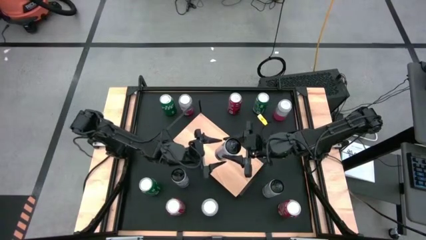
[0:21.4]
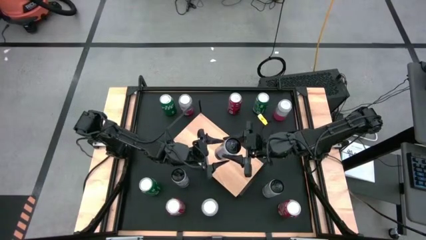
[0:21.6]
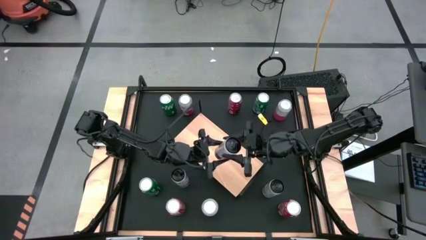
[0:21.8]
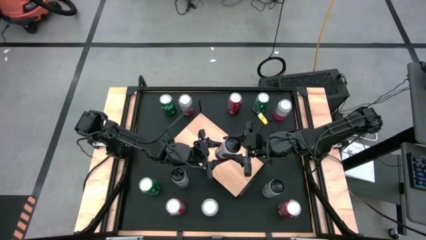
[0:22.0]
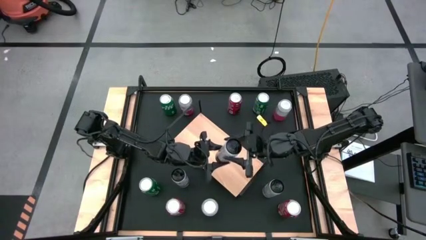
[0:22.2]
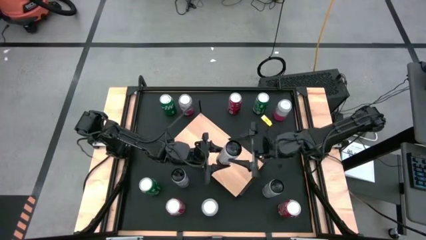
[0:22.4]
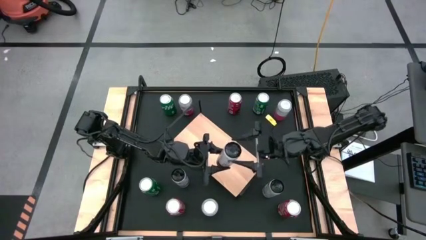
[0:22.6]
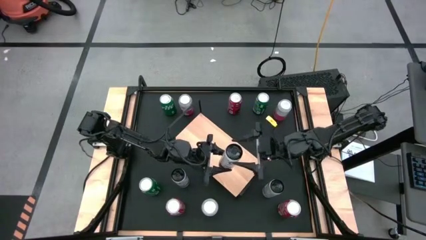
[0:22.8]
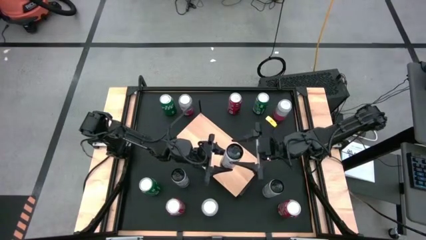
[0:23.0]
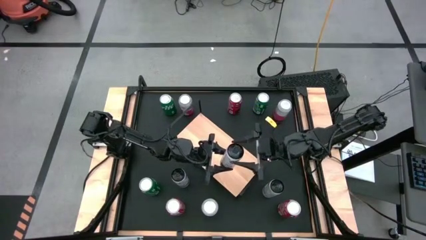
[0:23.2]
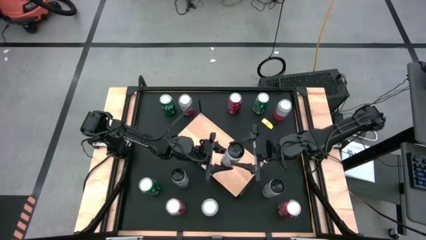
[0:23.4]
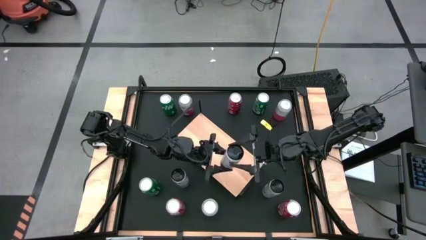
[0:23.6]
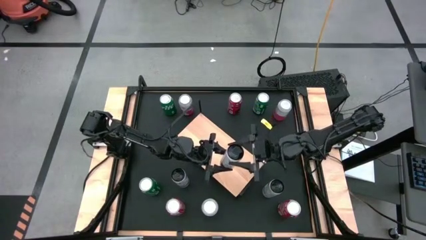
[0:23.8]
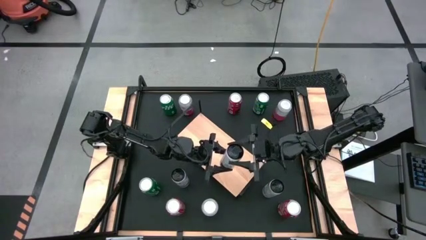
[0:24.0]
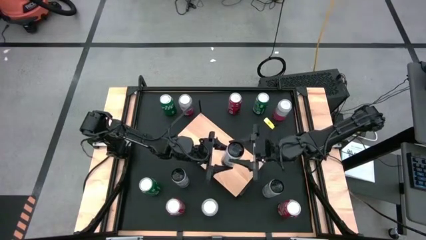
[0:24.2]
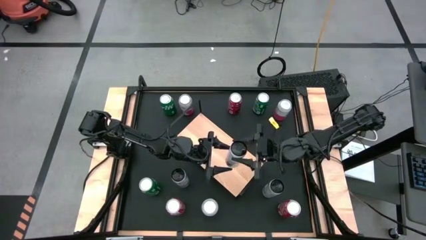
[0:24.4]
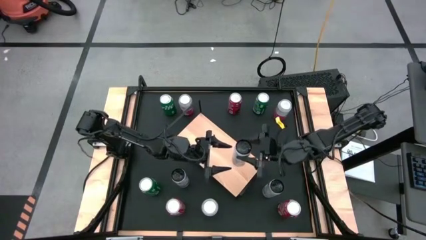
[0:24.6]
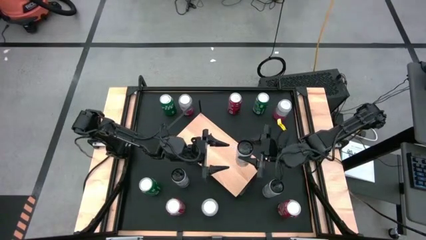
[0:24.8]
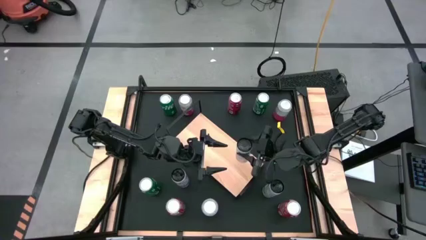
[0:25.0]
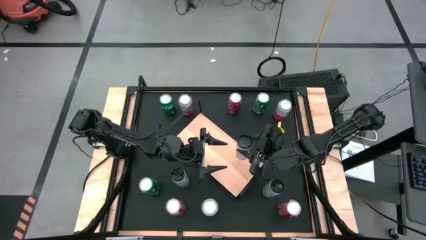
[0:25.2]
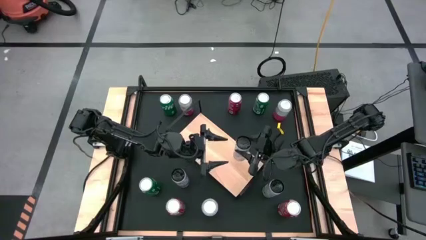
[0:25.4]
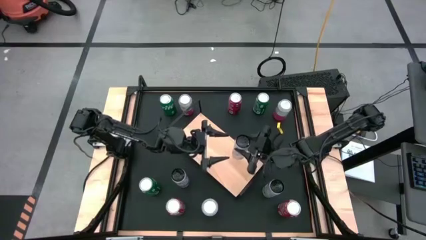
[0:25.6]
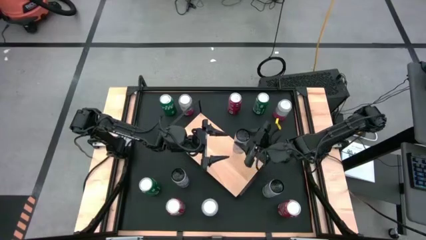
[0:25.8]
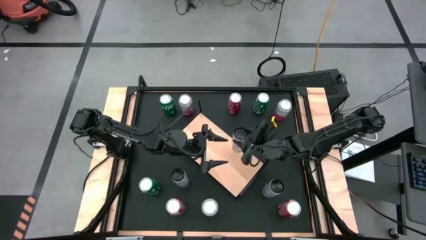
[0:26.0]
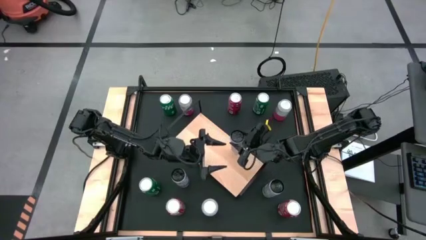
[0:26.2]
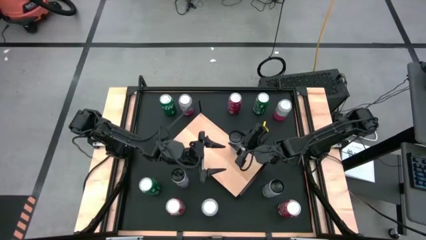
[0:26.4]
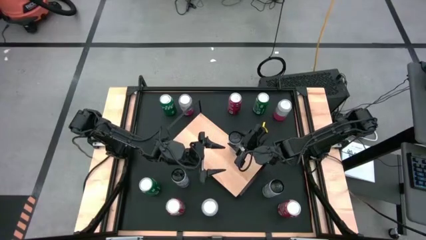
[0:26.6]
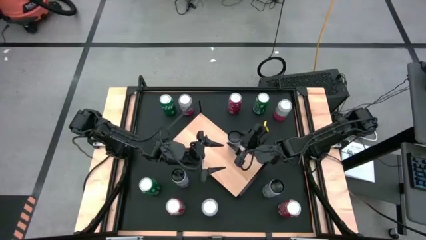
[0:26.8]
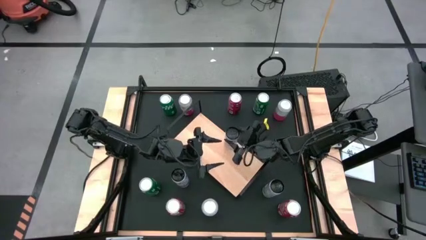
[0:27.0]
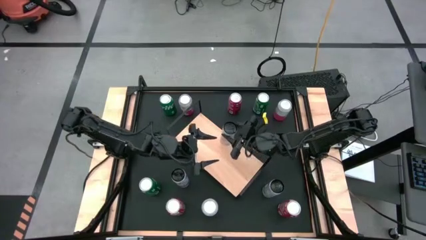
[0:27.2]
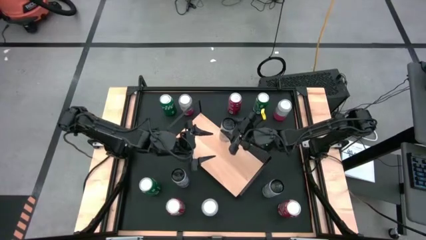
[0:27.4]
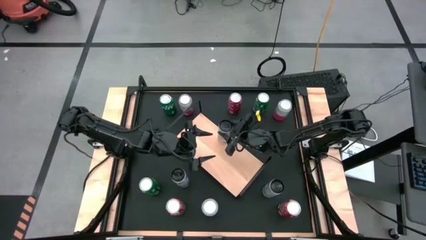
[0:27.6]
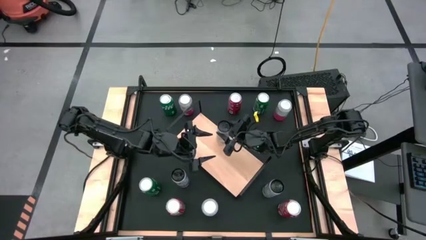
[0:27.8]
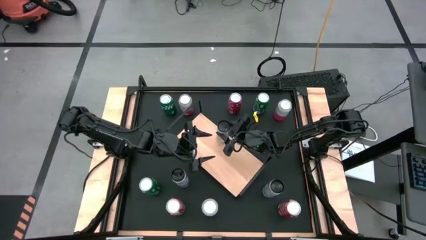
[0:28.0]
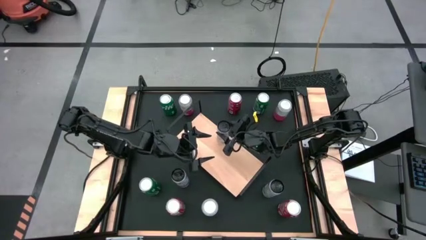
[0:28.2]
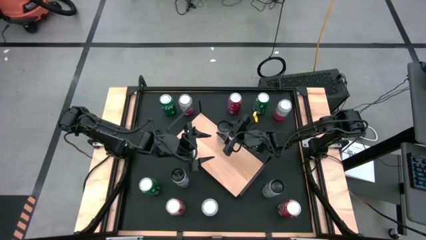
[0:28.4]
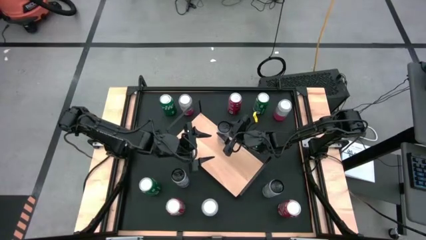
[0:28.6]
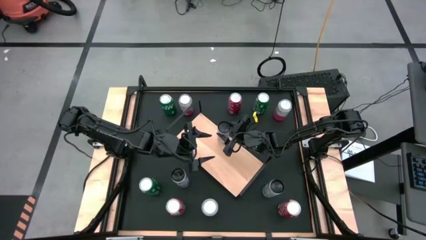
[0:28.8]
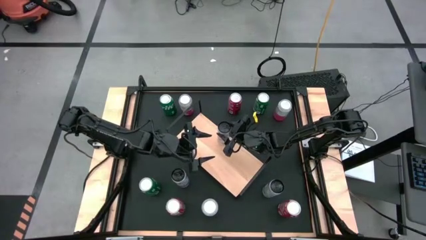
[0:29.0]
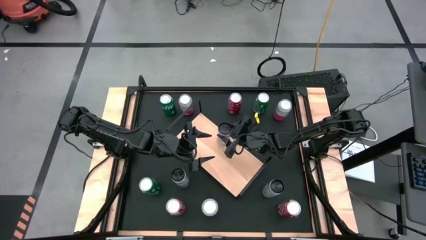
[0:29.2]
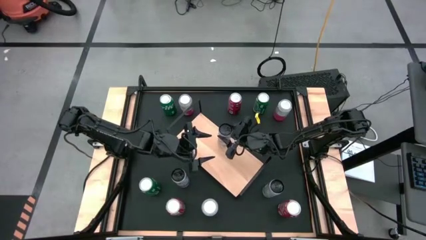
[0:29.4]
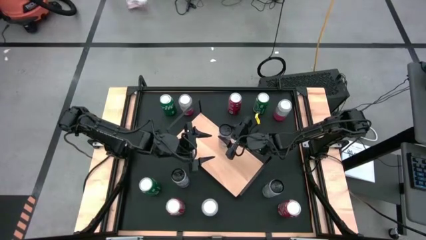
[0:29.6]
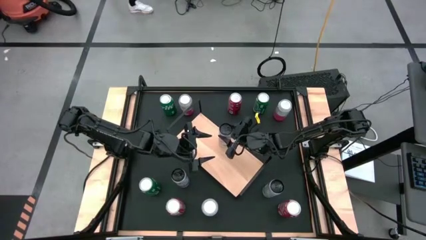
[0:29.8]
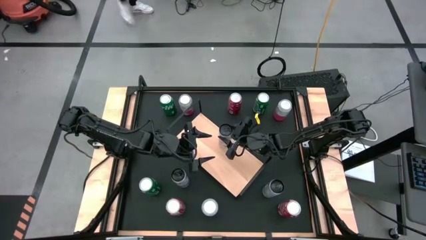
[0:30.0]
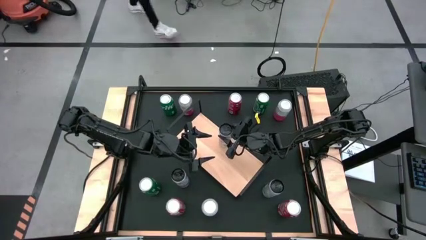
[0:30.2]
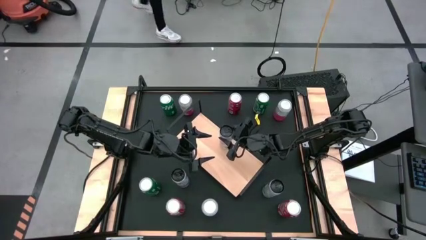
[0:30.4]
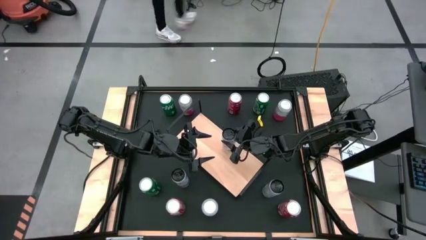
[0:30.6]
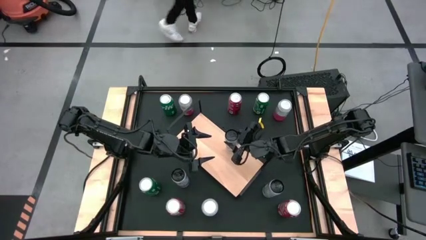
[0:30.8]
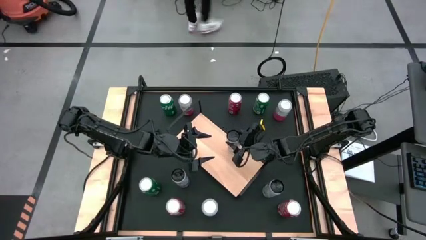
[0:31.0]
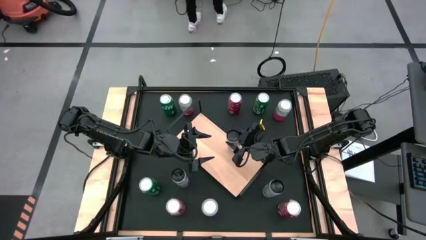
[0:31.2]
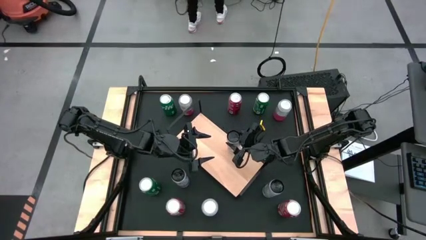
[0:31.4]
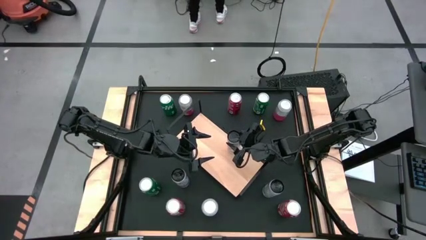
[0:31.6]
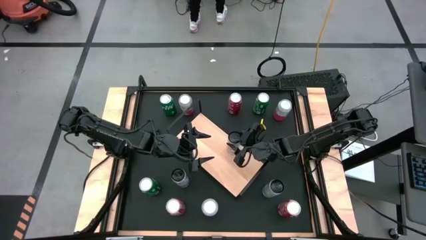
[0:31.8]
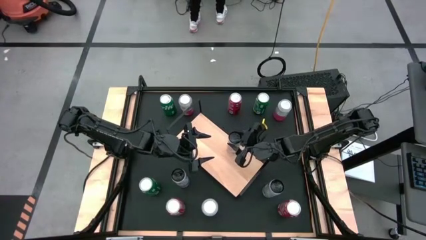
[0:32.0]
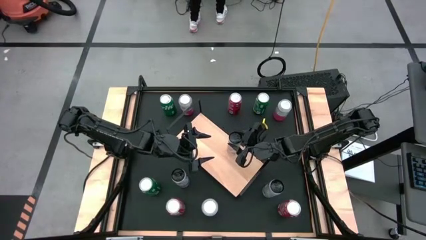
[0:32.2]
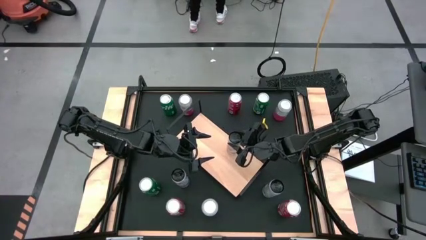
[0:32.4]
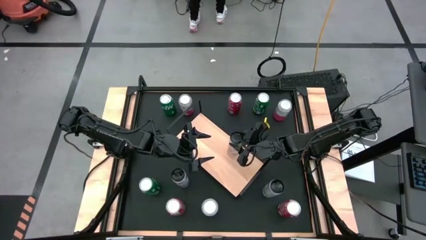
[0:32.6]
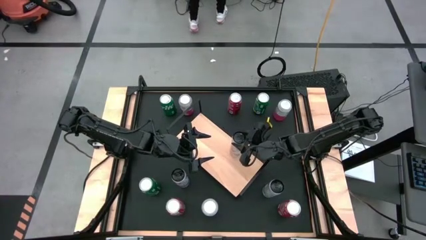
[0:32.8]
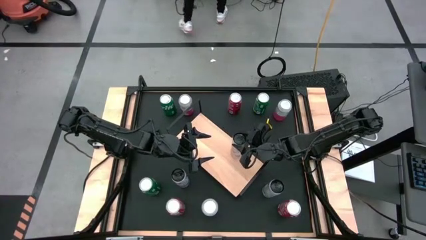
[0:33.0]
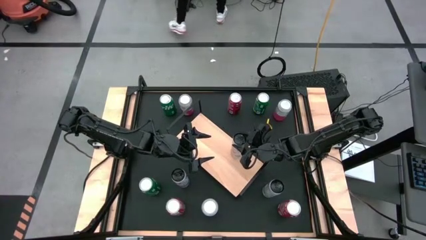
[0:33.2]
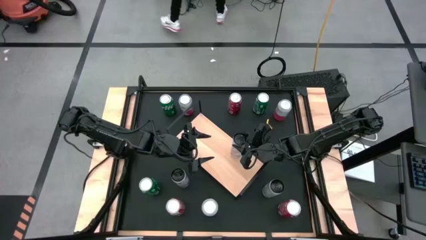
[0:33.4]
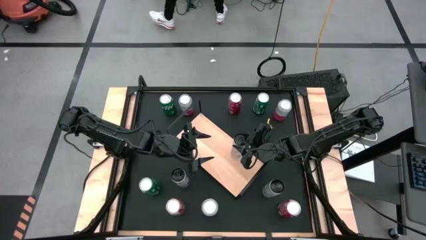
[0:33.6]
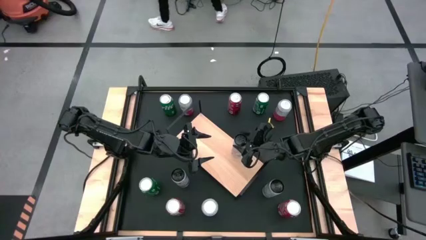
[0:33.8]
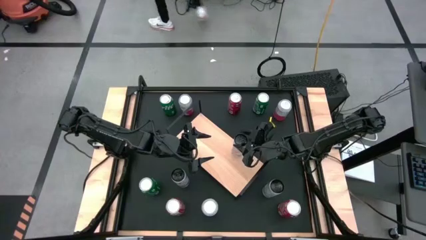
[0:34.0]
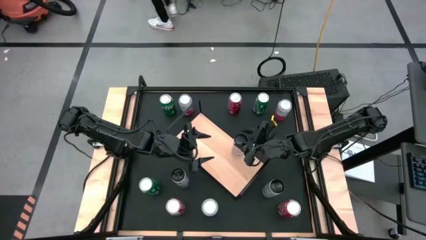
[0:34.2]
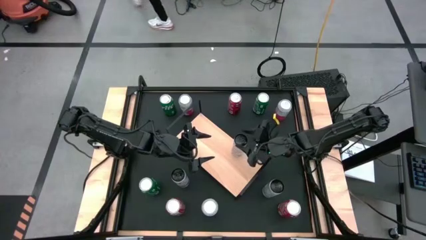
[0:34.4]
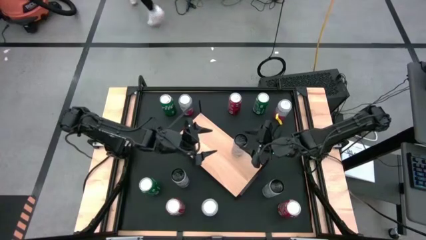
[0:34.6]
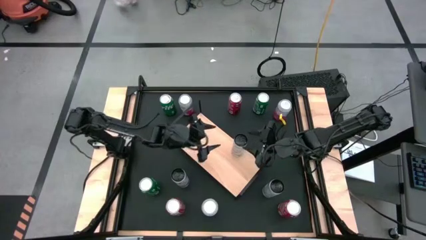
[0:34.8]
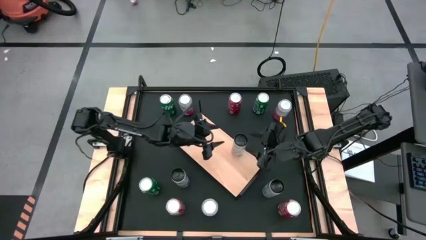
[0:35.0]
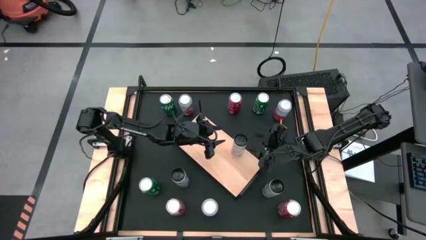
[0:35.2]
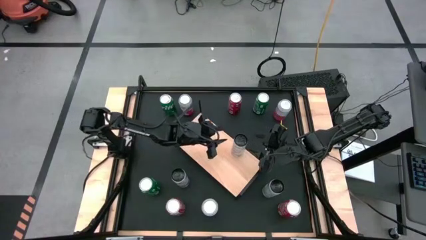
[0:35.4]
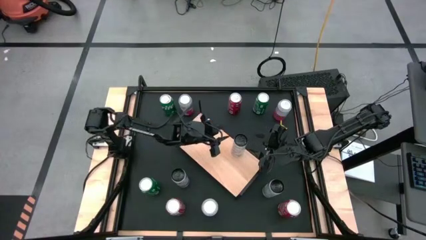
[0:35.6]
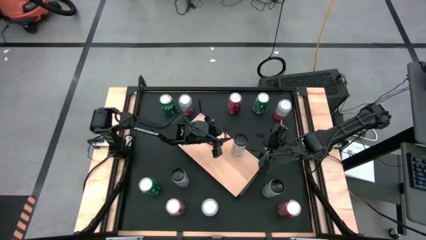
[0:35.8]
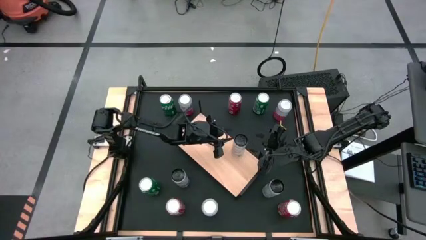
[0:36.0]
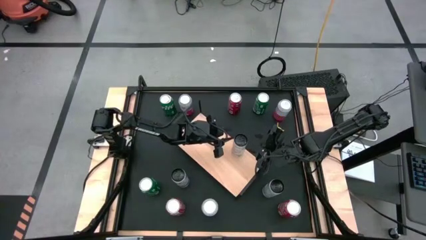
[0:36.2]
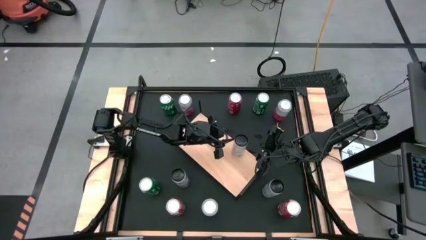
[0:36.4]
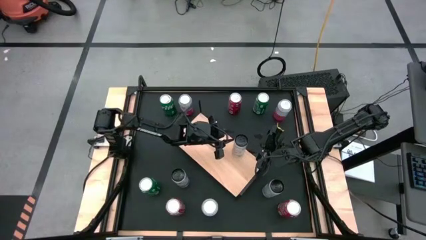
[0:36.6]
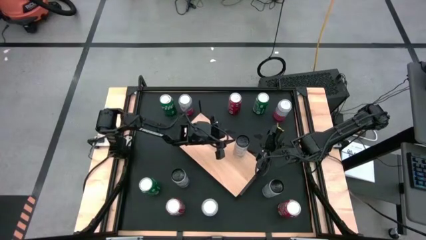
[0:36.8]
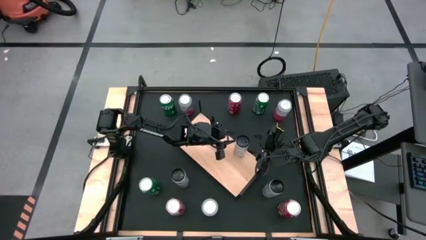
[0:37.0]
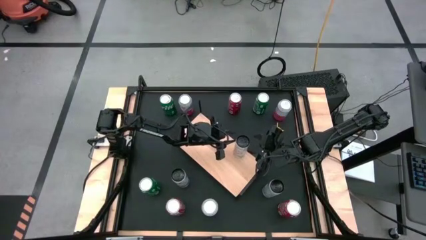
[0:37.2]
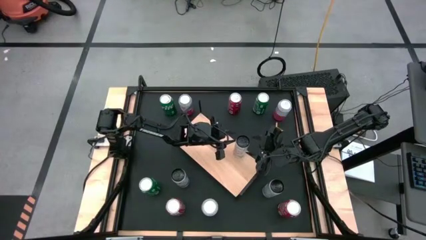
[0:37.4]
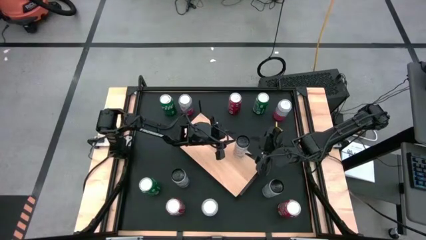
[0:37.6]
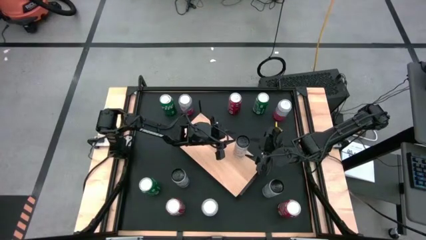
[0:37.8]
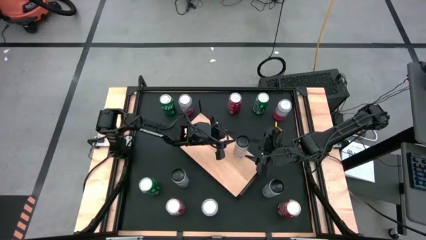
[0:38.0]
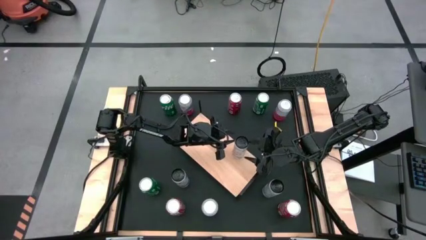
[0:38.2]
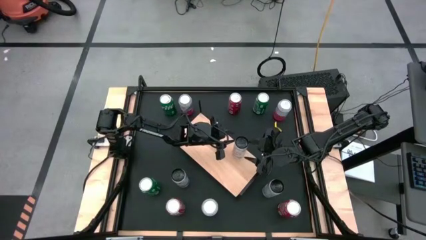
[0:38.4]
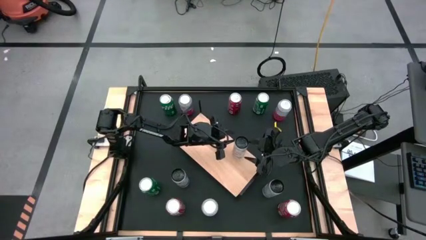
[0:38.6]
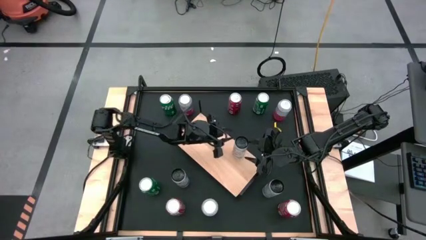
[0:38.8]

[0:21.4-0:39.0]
Task: Place canned beverage on shelf
Put the top white and pink soda can on the shelf
